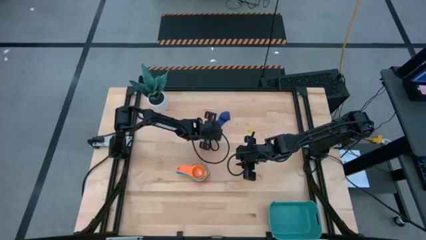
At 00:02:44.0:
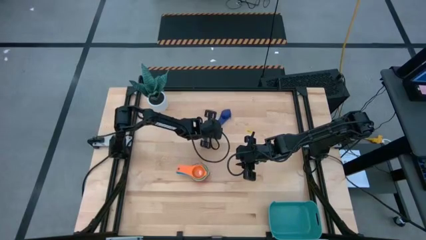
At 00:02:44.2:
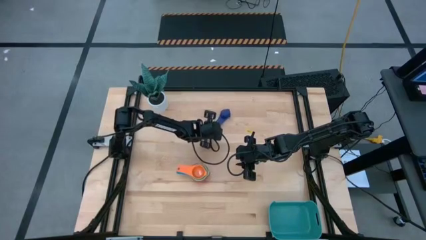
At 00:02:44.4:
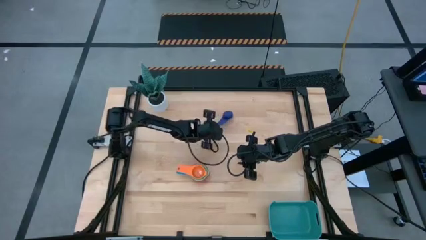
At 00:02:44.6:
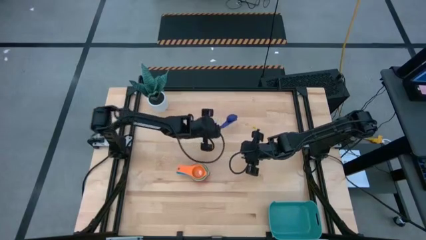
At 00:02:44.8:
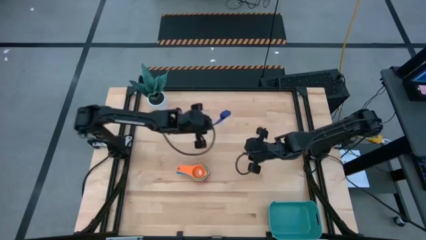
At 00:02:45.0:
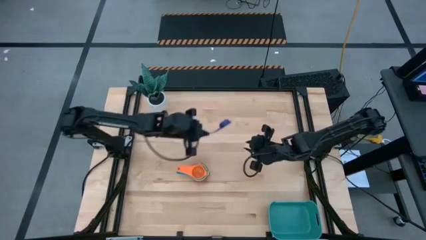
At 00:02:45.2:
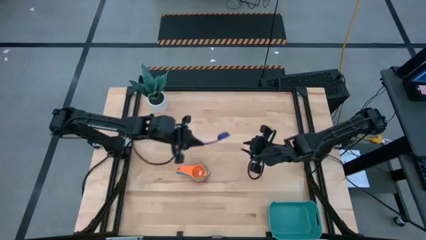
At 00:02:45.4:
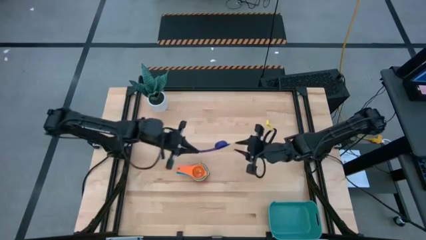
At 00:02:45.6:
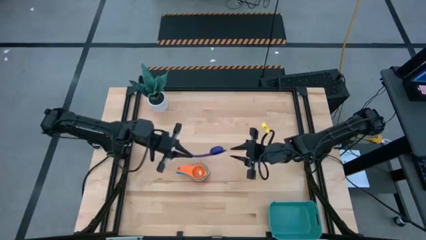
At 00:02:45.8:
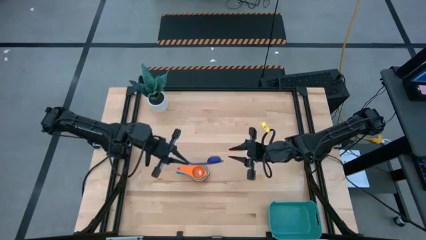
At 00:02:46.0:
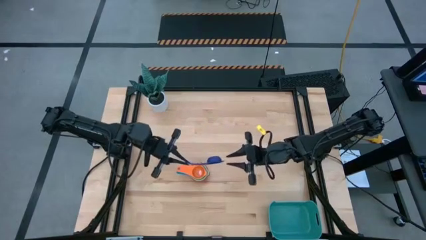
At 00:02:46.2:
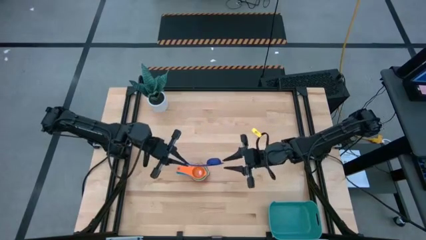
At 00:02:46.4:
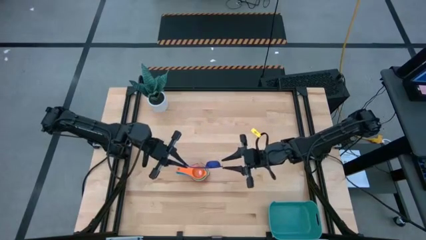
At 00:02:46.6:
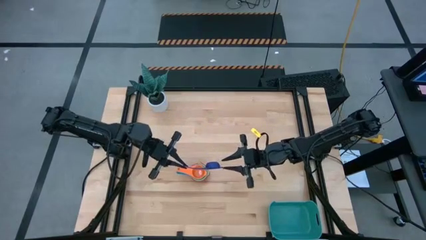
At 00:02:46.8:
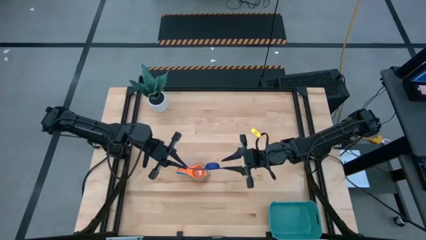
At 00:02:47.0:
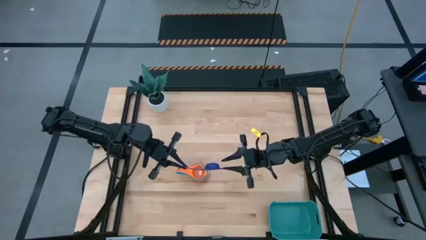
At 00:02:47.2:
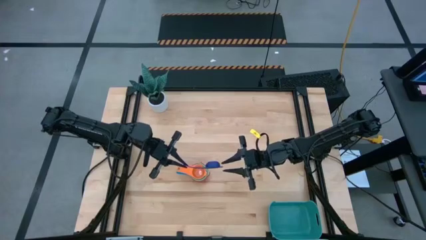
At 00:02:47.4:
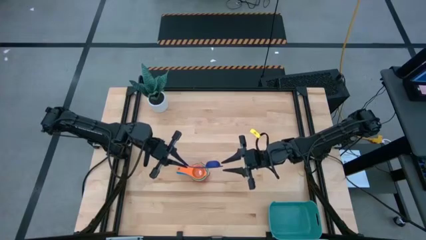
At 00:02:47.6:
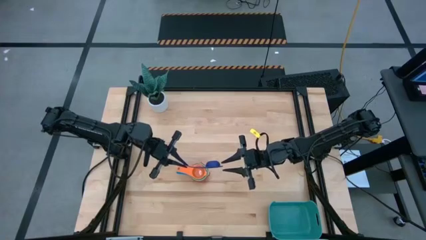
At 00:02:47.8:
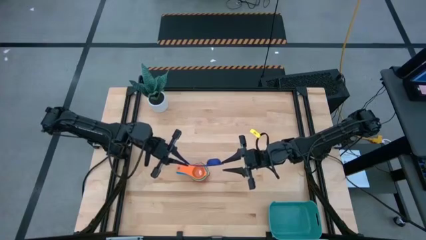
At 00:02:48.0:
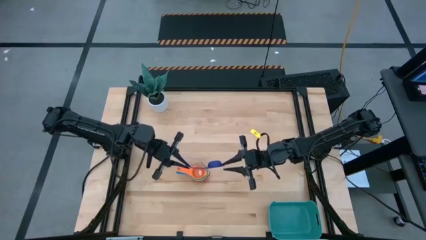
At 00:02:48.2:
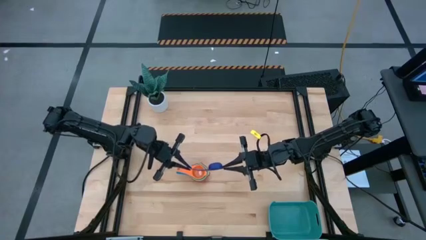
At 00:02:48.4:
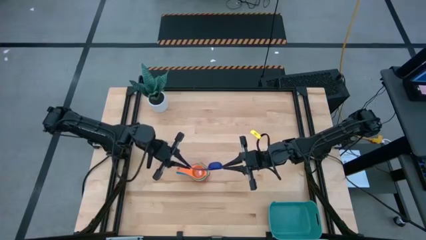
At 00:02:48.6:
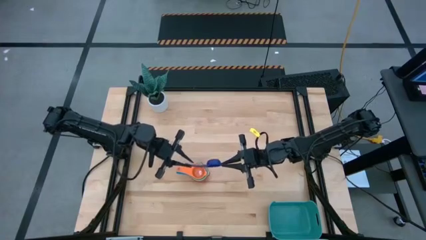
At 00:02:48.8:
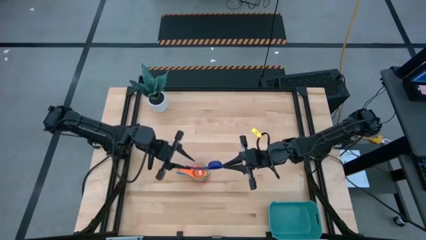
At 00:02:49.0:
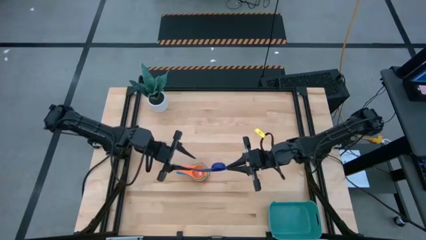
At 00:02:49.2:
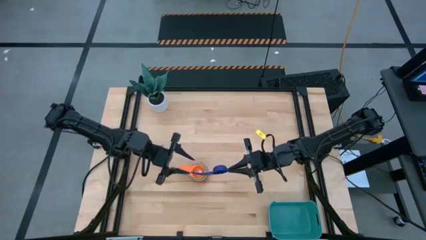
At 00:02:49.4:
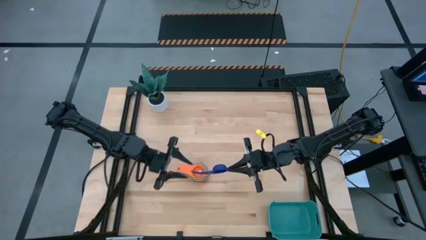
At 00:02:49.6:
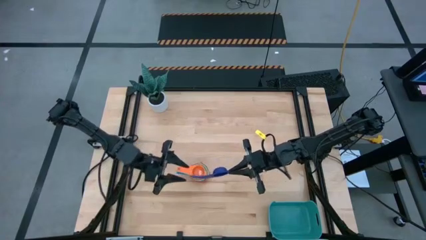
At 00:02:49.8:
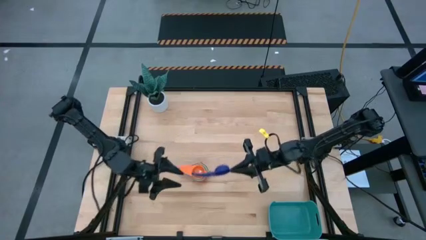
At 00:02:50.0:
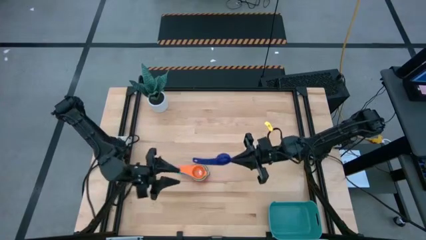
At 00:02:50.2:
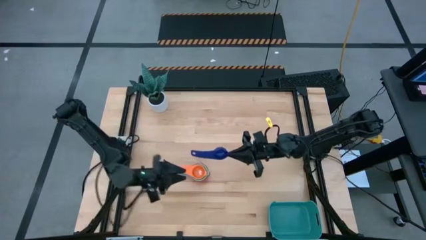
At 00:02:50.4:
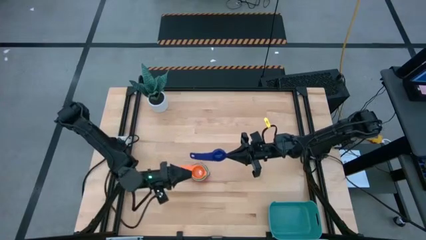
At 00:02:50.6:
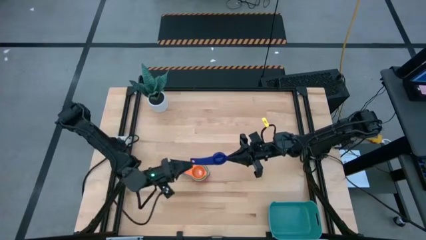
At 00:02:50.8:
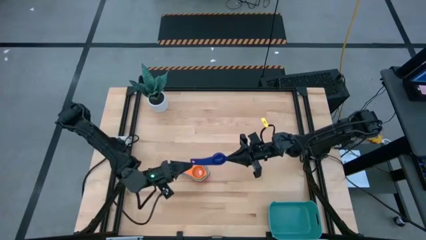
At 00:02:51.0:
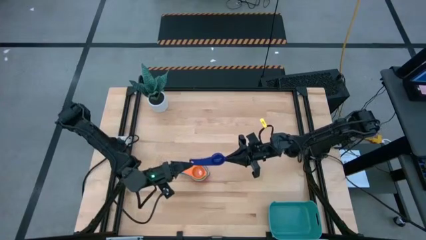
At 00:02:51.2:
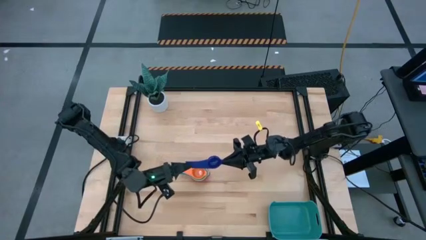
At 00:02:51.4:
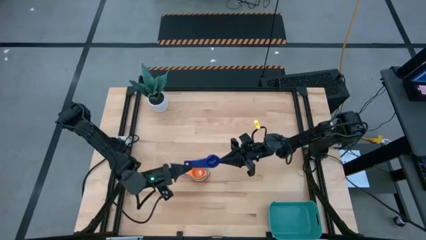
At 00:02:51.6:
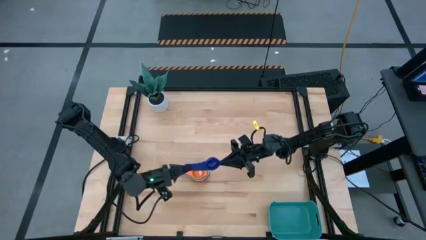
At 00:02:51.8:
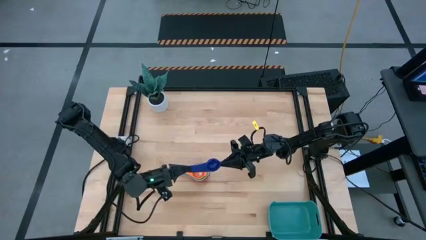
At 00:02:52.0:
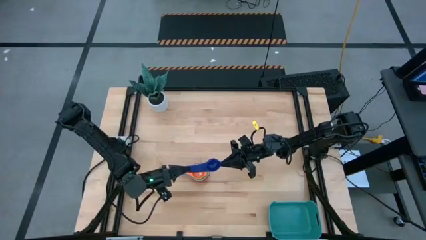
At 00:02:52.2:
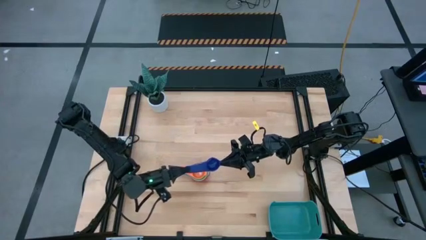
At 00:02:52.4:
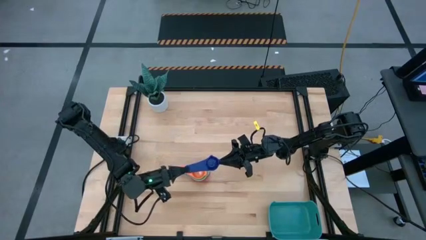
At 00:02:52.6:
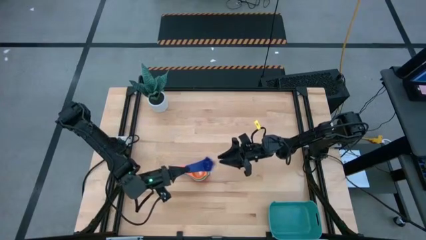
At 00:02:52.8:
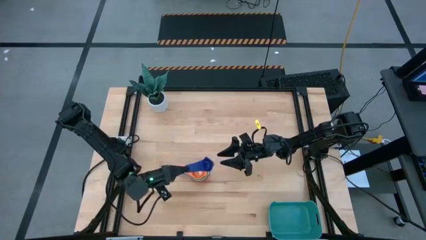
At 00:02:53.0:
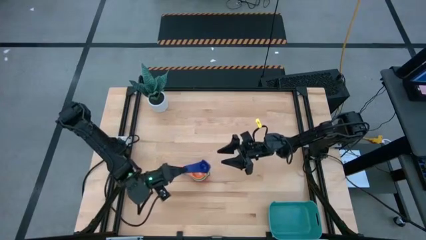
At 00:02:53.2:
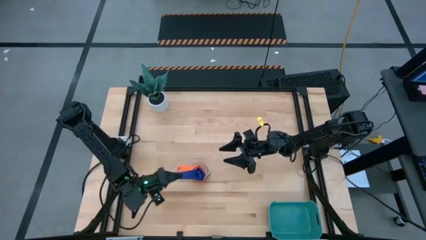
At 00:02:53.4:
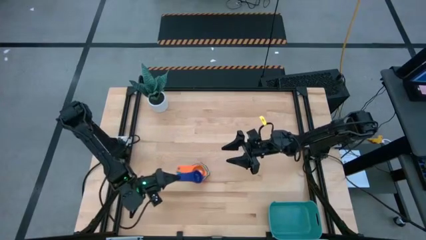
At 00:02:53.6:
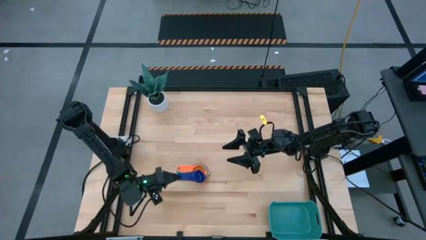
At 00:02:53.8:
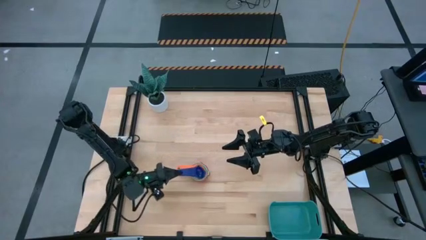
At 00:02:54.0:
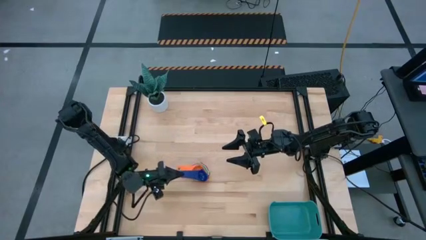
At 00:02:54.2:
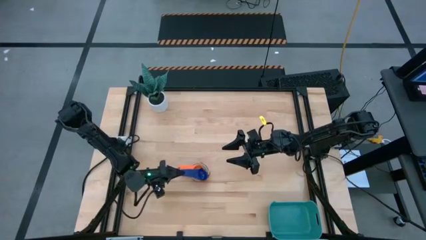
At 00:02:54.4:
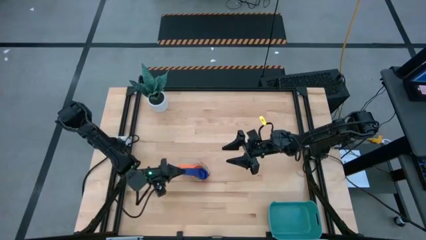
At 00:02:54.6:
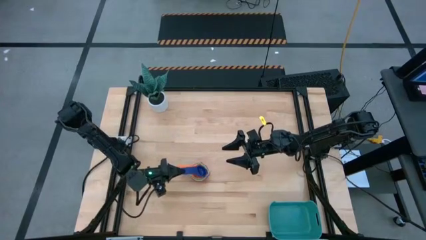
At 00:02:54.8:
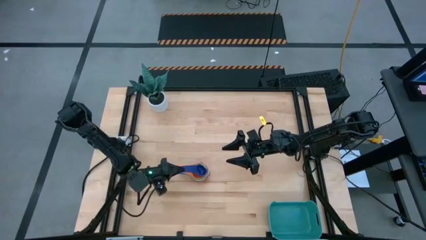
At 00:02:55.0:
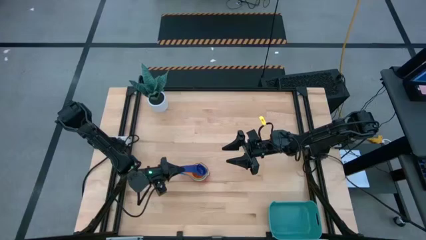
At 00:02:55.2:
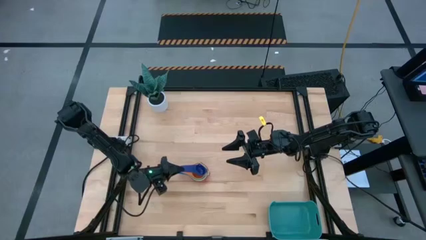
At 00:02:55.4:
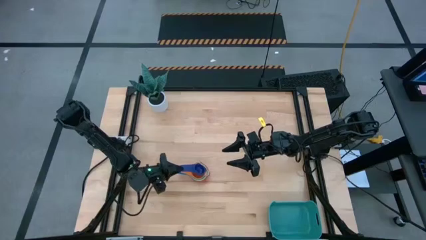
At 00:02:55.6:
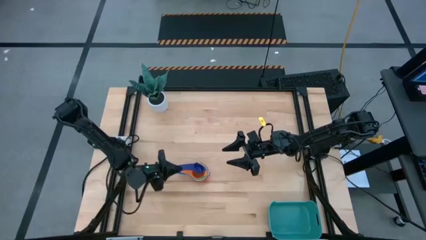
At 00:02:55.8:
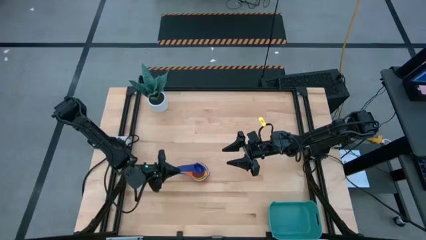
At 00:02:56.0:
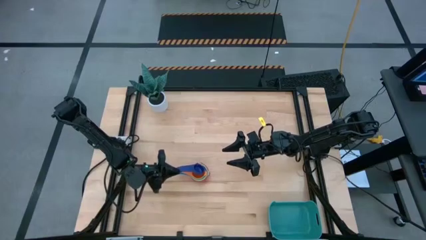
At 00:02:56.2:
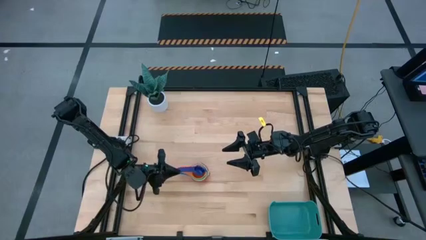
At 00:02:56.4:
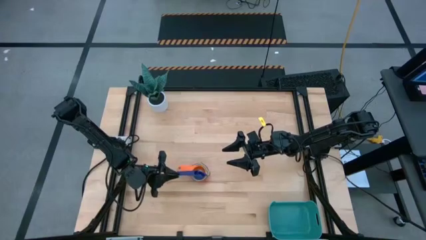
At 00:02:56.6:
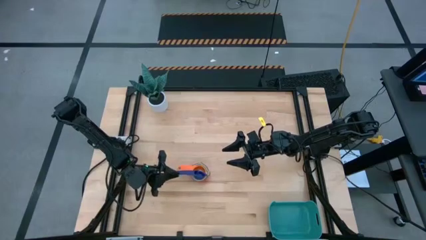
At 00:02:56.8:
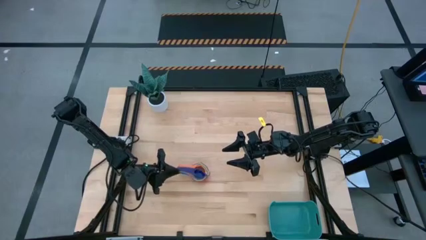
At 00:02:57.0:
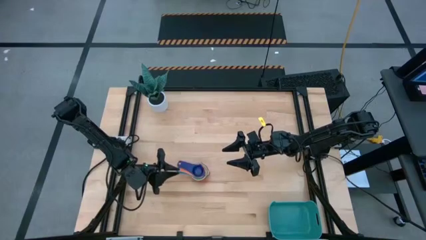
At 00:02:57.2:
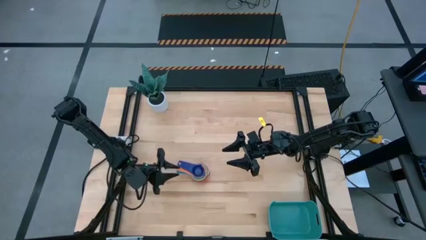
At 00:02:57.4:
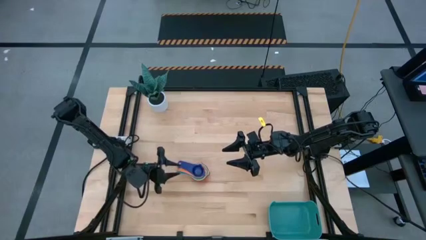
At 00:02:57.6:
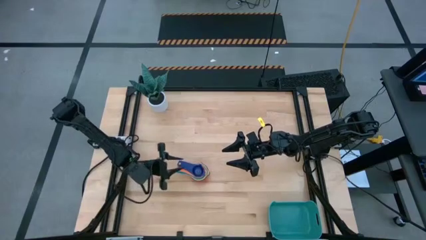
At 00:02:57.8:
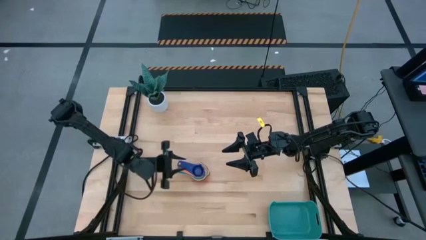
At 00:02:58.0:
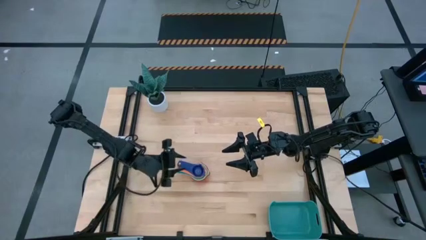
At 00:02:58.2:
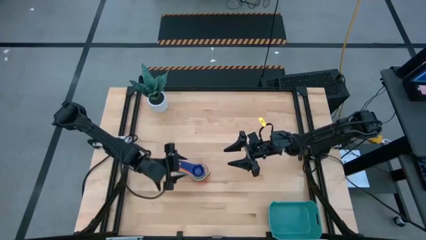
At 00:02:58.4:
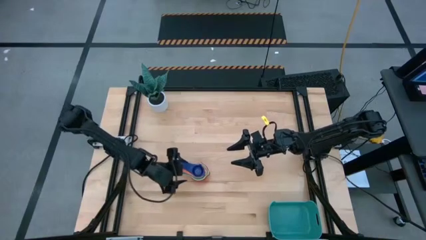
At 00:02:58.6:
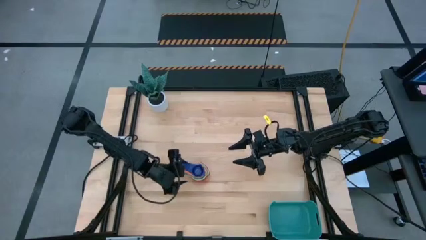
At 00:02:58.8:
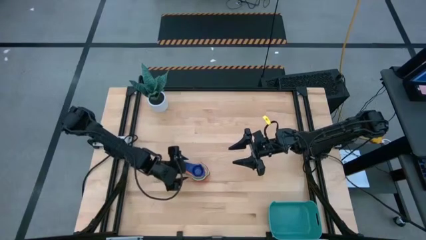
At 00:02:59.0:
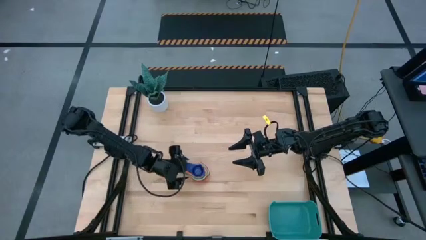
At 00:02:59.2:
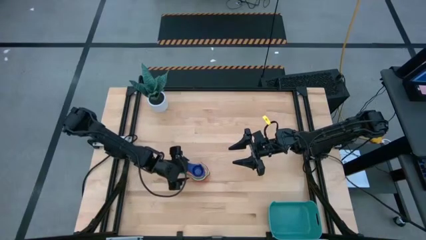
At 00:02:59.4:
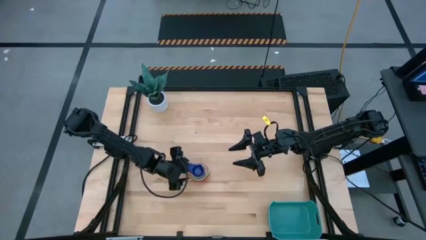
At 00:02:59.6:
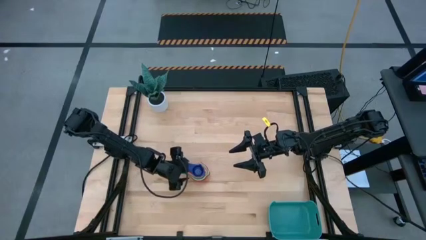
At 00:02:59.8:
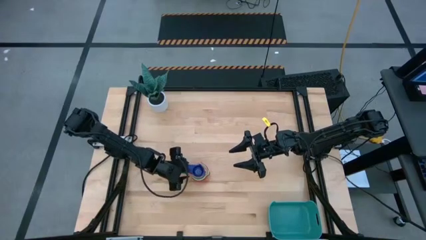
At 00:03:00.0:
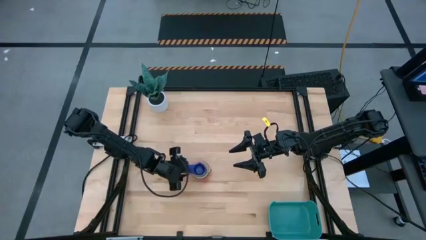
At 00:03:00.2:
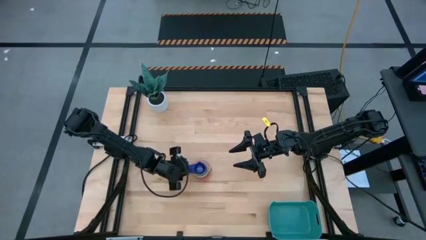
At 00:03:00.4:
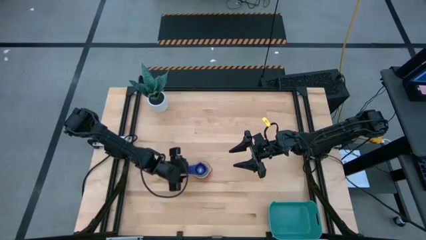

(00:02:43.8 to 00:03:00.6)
Task: Nest measuring cups in basket
Stack the dark blue measuring cup on top of the orange measuring cup
